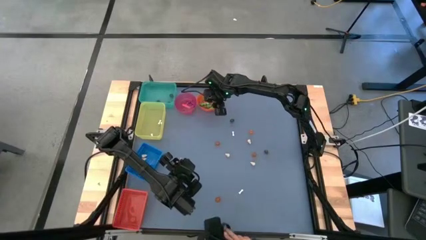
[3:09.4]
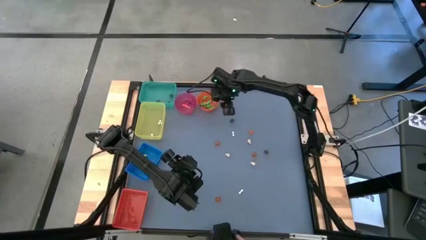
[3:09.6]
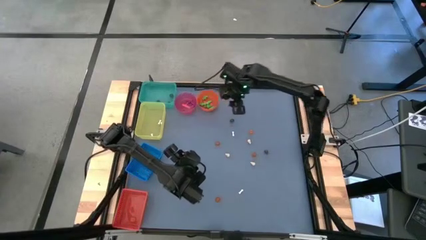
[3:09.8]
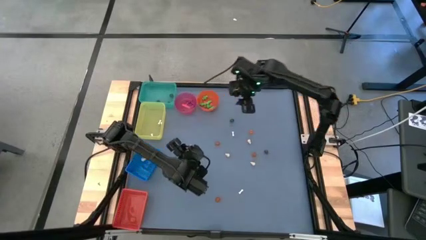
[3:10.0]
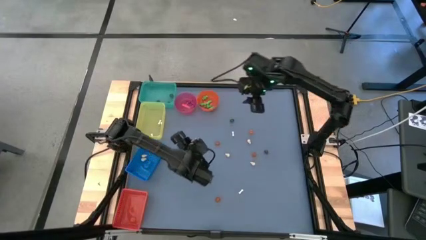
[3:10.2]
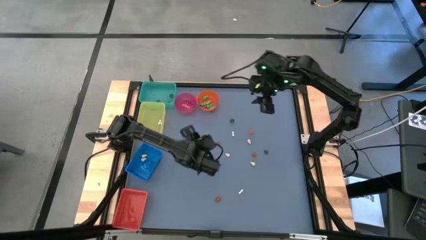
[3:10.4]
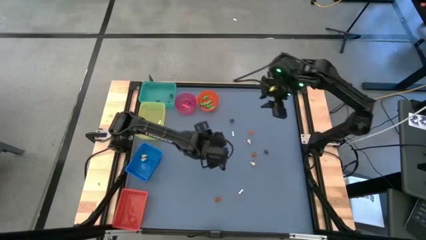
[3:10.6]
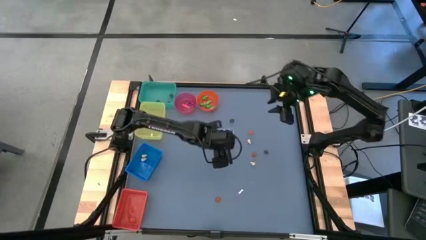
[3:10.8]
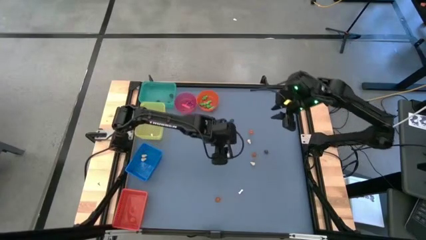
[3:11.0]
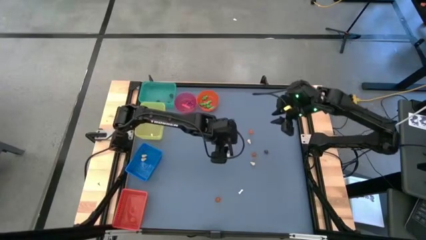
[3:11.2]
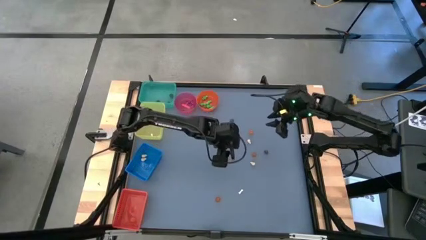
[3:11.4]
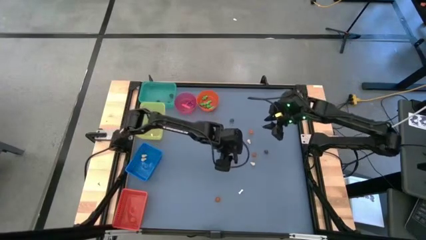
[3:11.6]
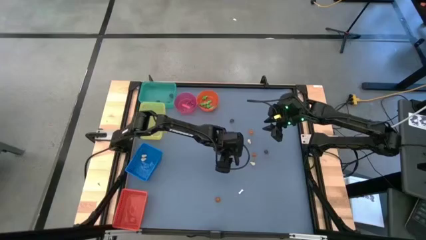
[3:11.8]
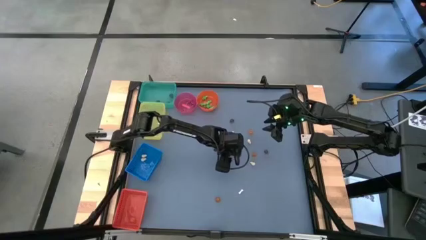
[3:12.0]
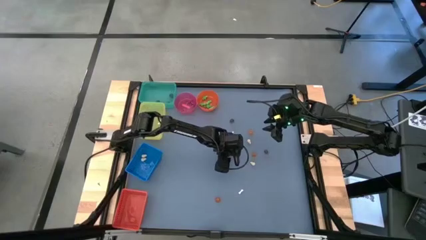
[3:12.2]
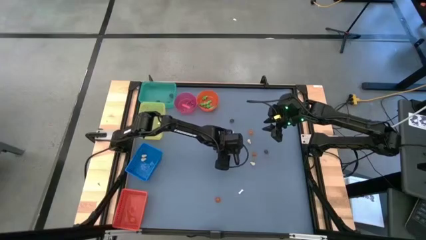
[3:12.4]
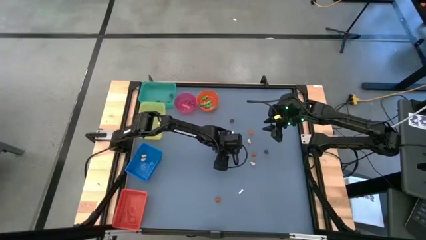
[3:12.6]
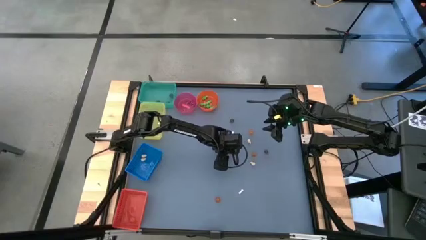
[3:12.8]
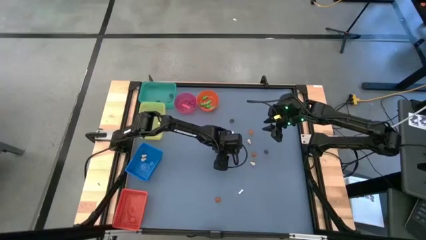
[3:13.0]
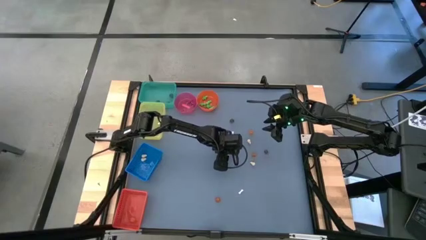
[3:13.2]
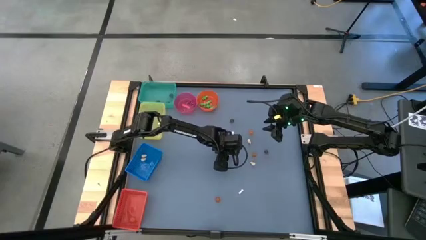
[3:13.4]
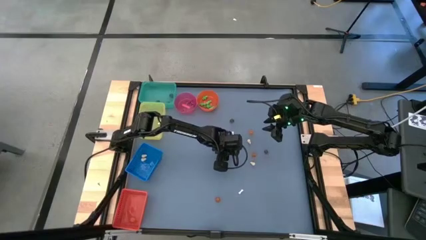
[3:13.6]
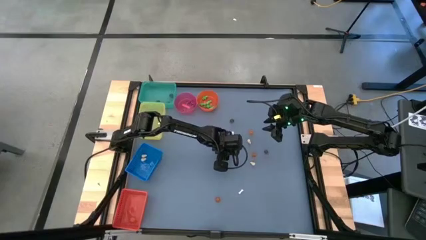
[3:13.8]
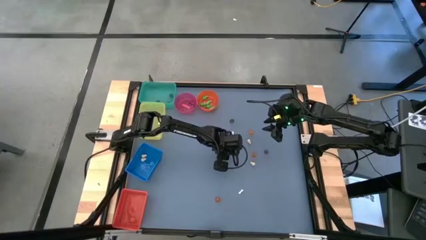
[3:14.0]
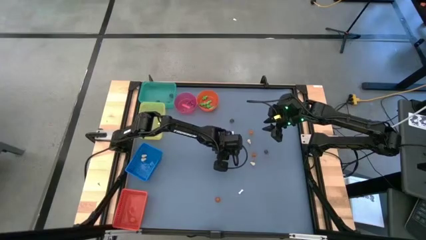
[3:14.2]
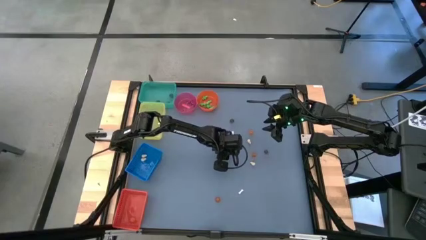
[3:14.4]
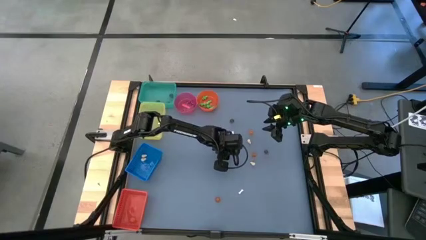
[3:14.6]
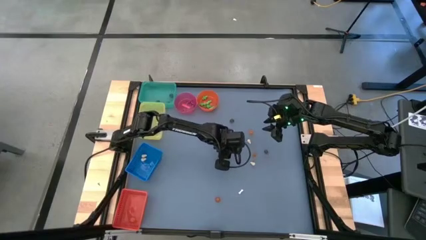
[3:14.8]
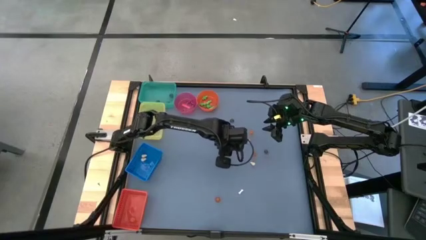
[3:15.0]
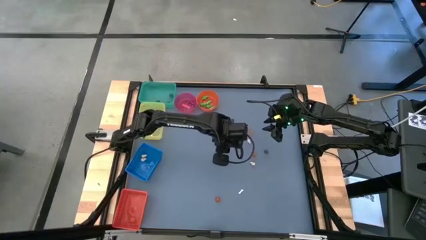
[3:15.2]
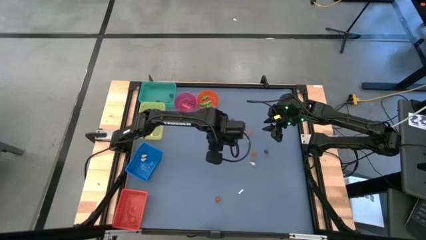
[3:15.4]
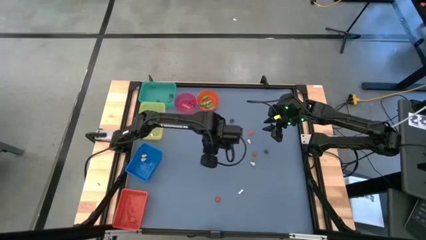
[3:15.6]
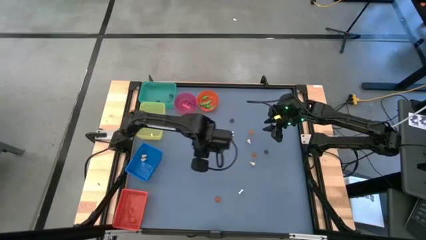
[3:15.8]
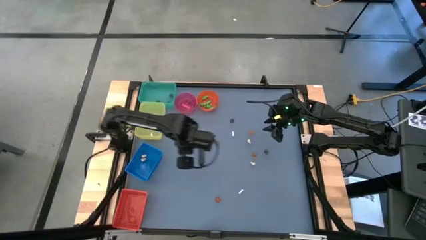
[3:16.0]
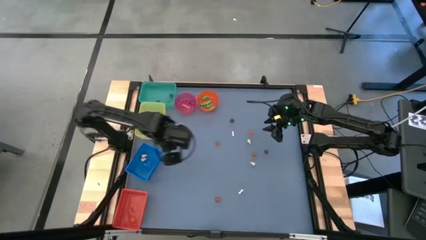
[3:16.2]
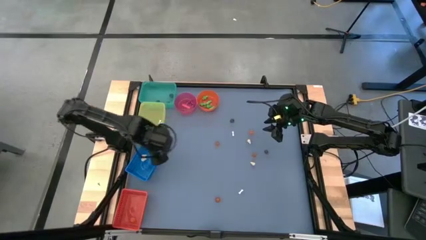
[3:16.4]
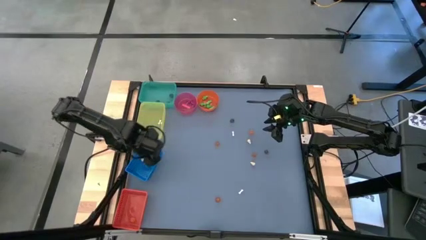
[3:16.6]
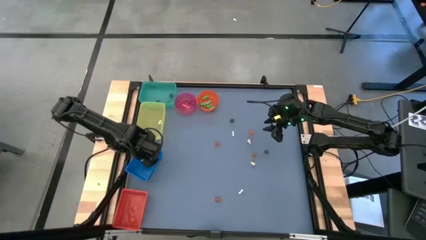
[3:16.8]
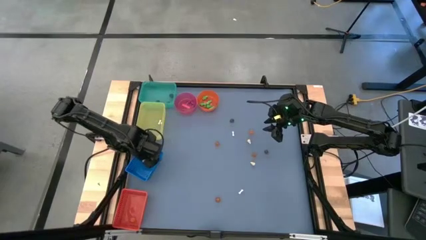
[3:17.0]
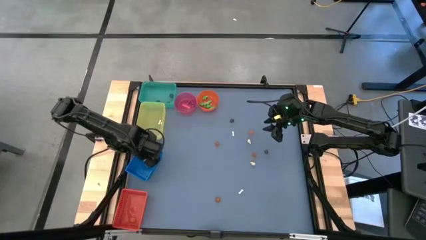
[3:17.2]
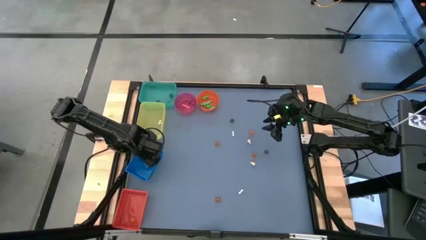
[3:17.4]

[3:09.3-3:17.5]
Task: Sort Halloween decoration
Put the yellow skull toy into the blue bin
